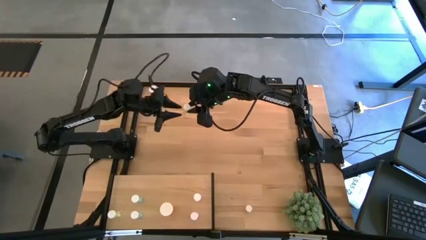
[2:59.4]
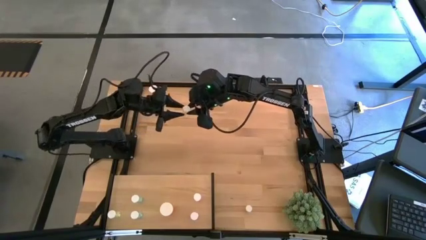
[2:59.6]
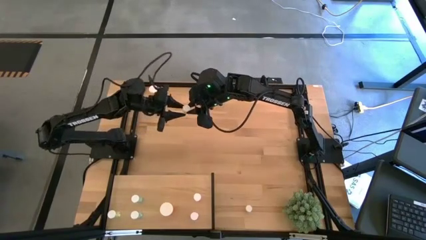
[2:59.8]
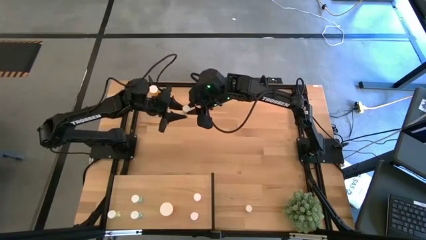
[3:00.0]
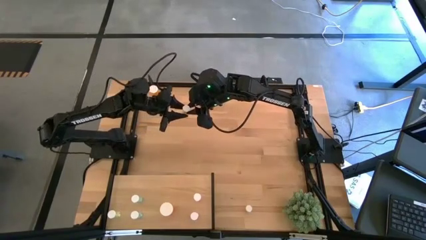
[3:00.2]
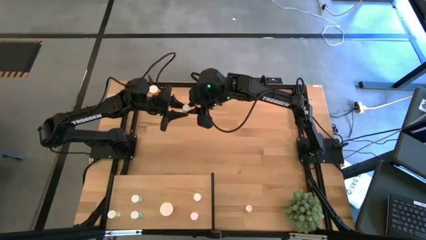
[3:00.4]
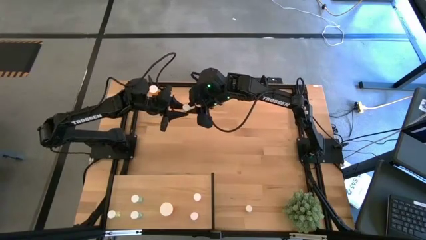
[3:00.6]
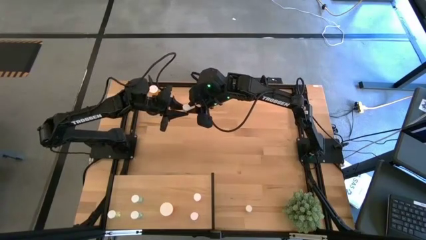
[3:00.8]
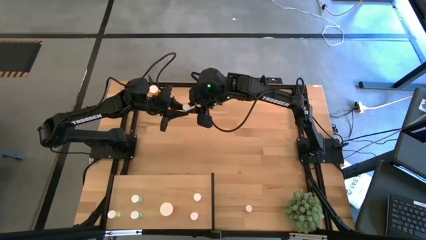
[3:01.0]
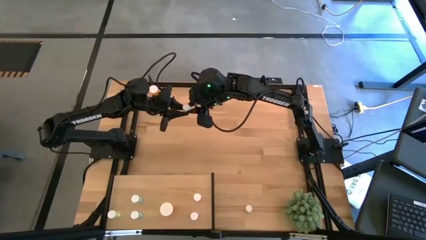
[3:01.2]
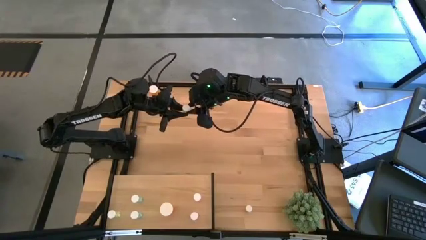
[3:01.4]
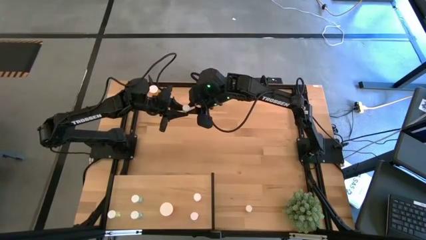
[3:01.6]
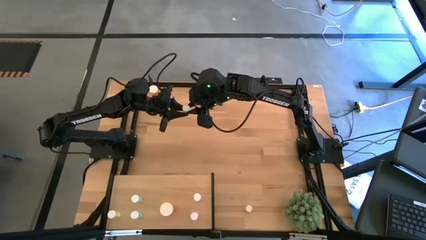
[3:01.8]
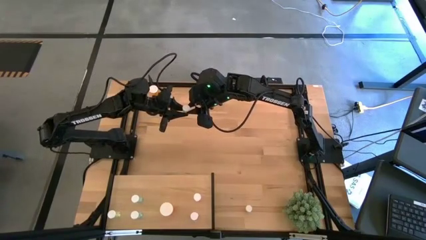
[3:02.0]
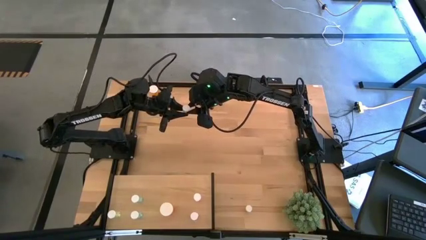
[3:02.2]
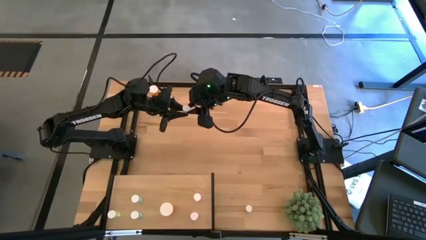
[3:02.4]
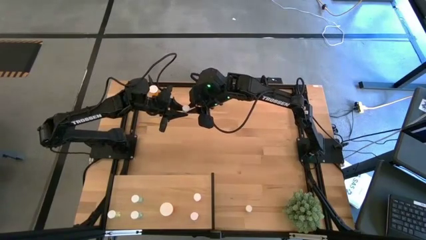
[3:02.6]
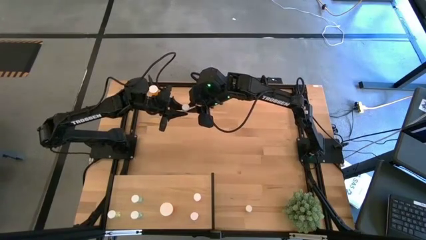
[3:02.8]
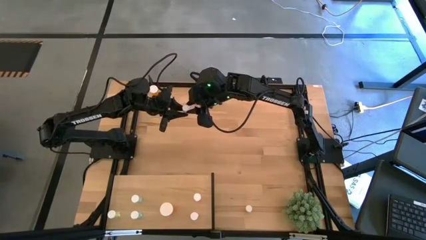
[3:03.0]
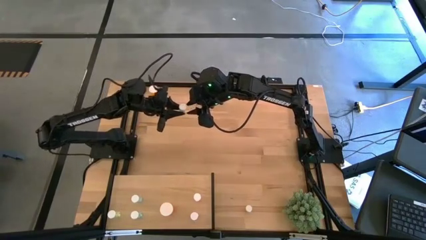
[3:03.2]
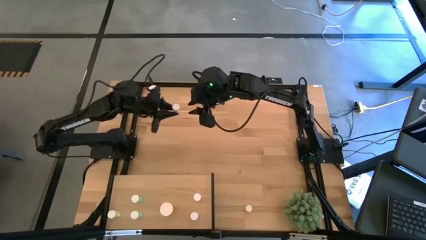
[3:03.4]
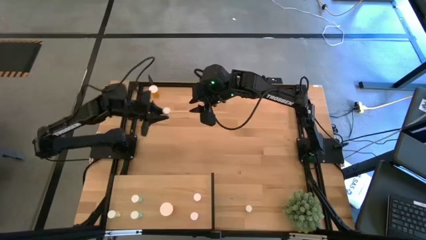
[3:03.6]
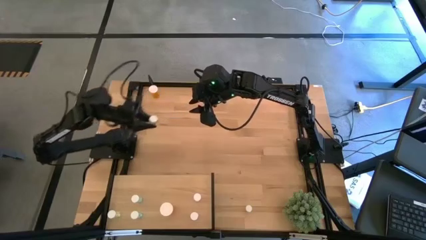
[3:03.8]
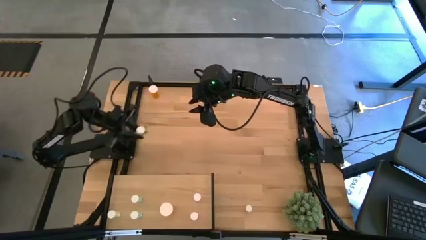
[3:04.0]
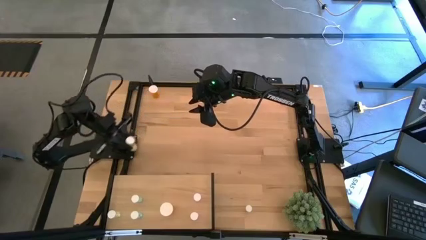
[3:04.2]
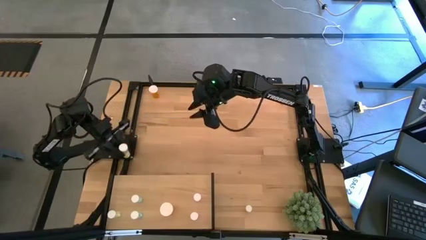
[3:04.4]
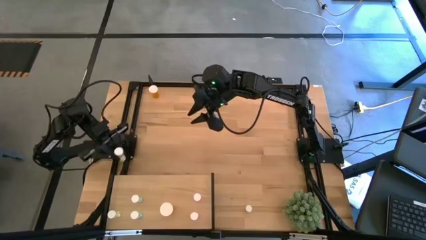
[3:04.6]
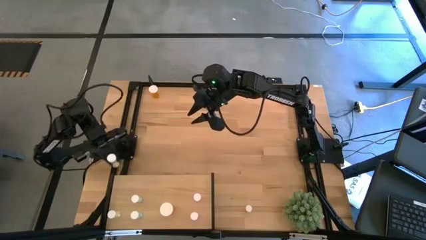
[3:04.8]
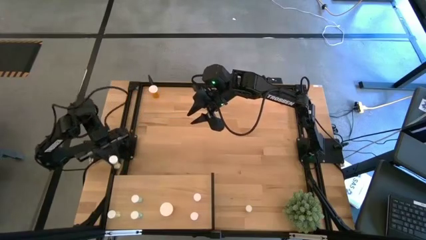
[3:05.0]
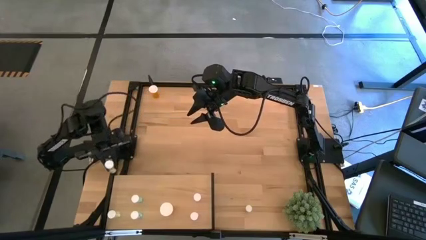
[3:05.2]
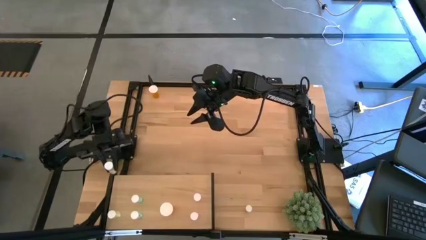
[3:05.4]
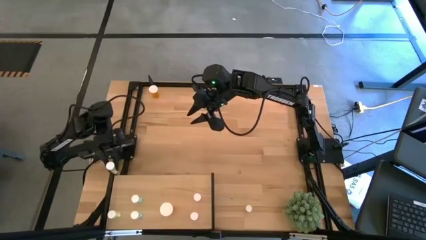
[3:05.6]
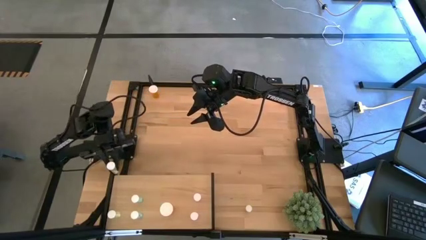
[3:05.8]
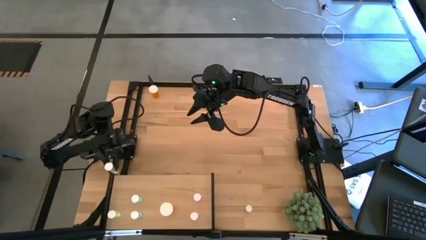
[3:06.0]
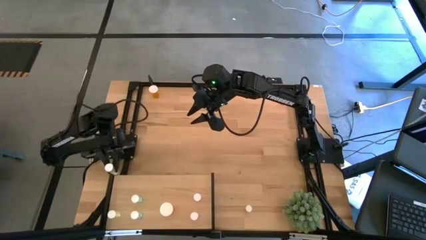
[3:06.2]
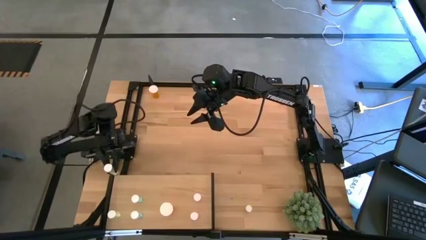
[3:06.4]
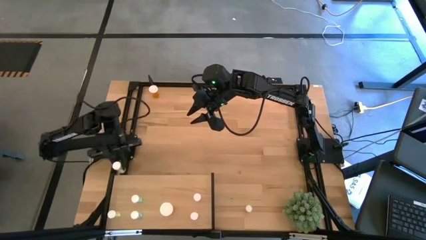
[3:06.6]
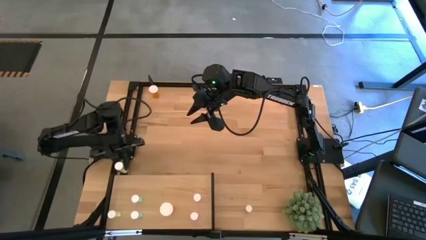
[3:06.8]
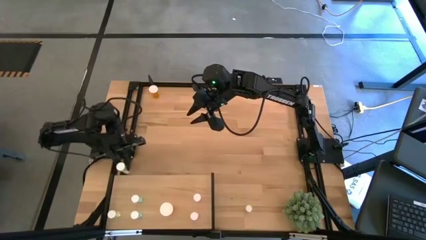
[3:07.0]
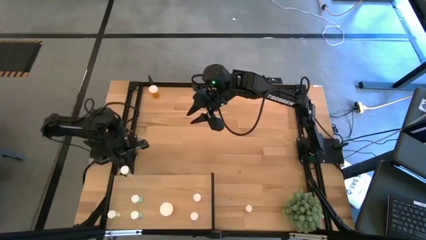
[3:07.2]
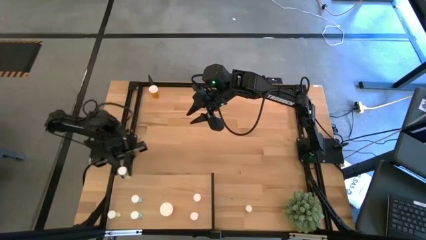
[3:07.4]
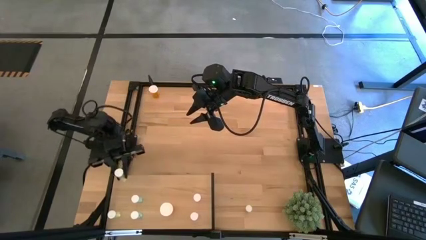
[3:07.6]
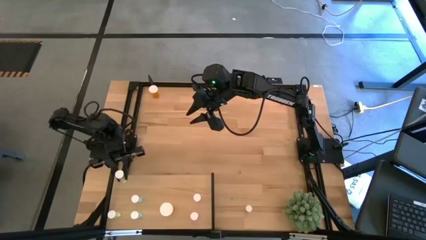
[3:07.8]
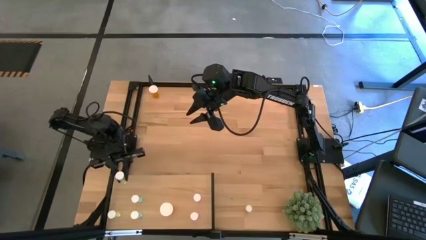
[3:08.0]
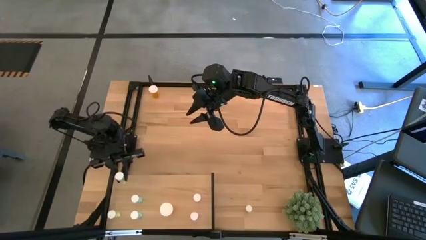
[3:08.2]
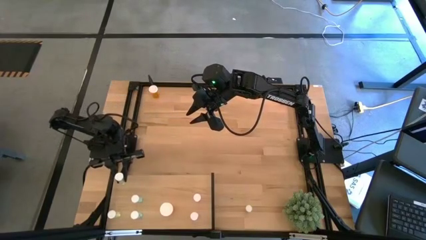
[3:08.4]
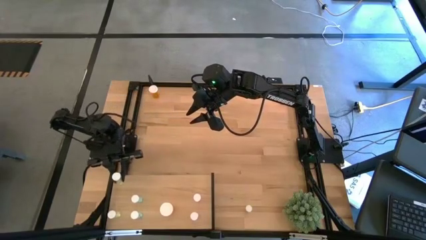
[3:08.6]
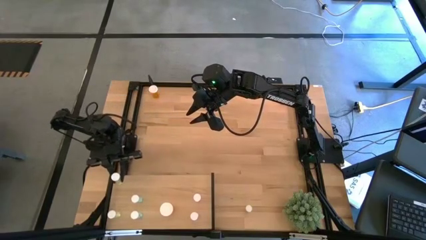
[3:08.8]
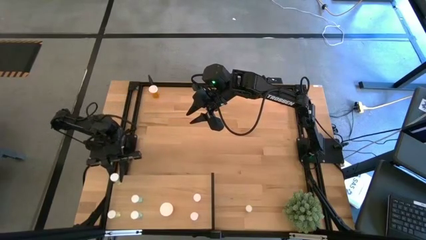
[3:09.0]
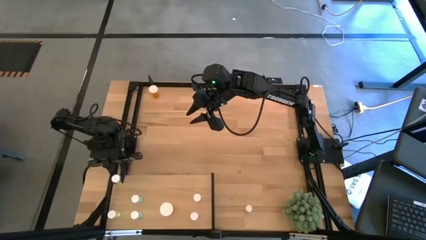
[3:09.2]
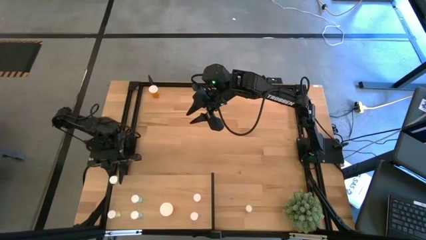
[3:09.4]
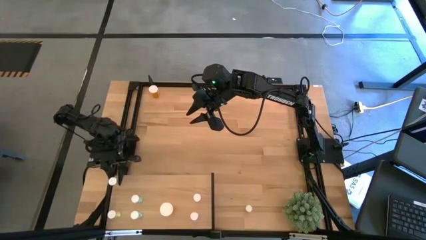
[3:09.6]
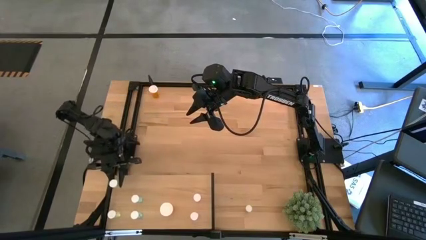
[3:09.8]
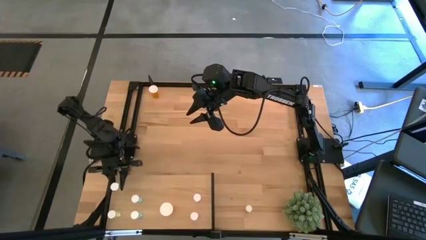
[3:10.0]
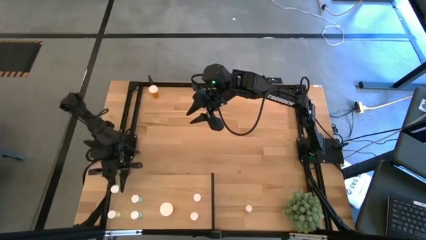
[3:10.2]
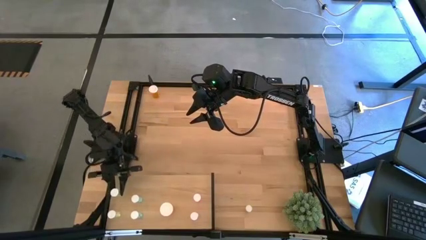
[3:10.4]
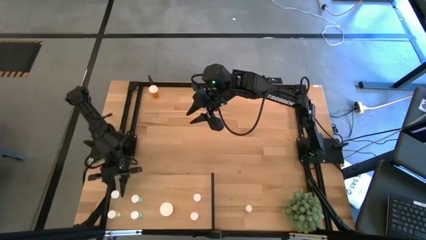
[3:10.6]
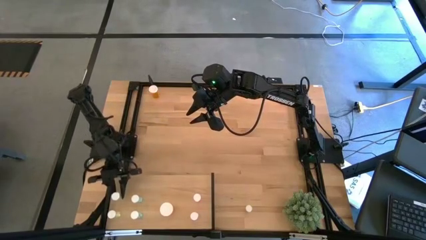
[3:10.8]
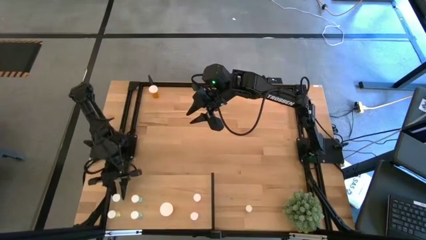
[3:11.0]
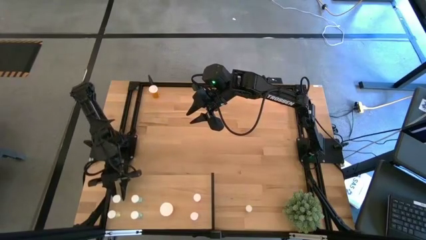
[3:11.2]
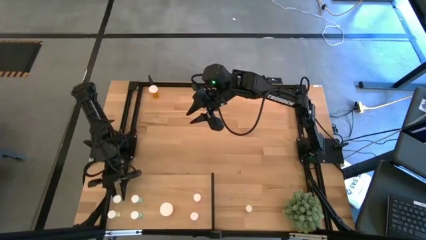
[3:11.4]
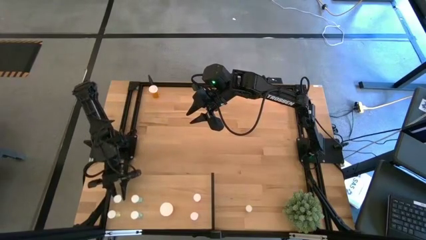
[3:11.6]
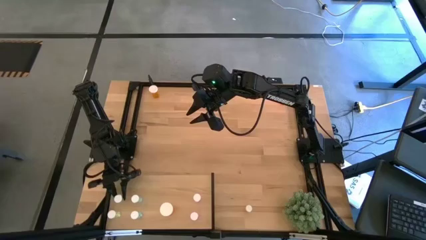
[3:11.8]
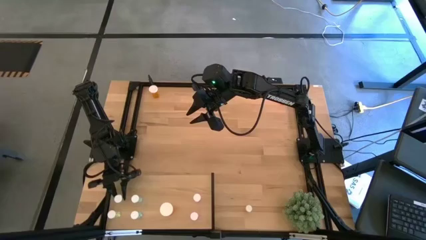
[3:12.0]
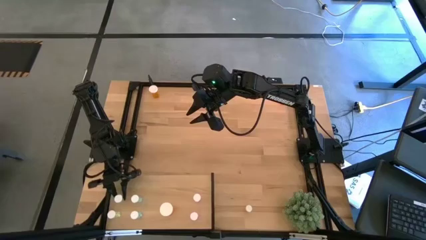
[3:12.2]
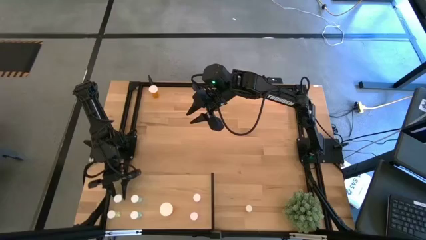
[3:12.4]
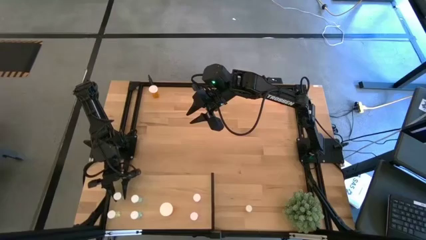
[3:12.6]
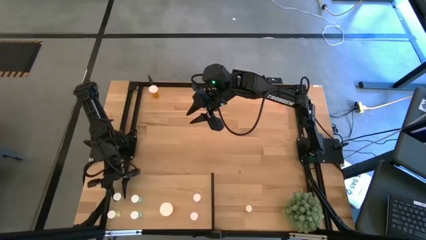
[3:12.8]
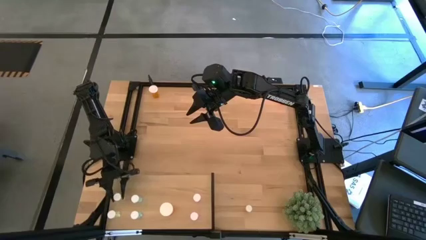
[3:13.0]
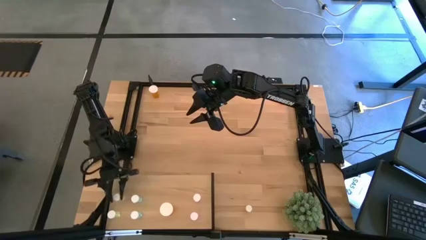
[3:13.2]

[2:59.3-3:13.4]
Task: Pick and place medicine bottles onto shelf by color
Put the top right yellow pill bottle on the shelf aligned with the other yellow pill bottle

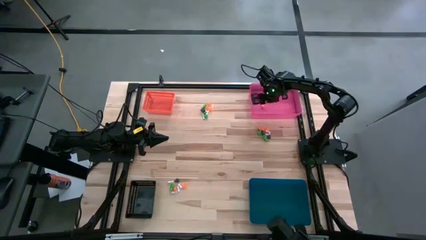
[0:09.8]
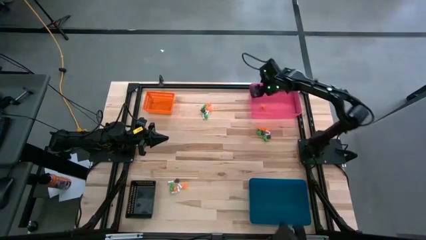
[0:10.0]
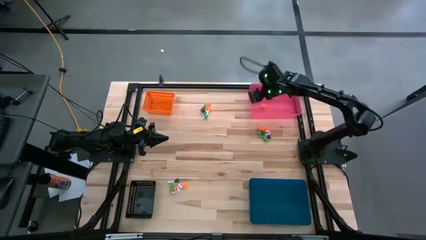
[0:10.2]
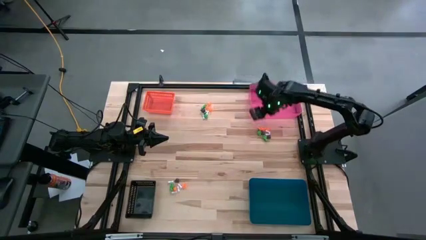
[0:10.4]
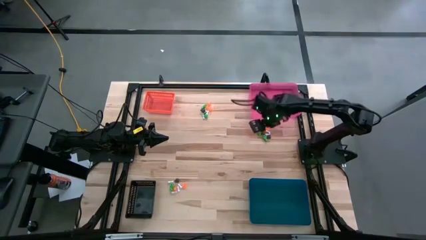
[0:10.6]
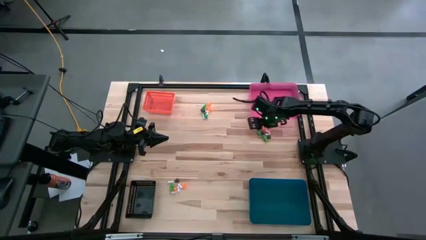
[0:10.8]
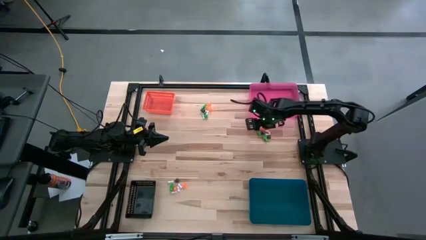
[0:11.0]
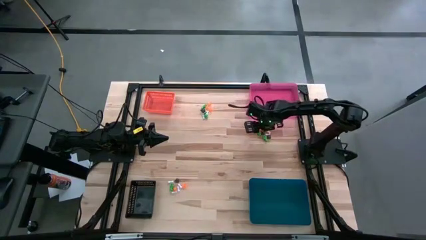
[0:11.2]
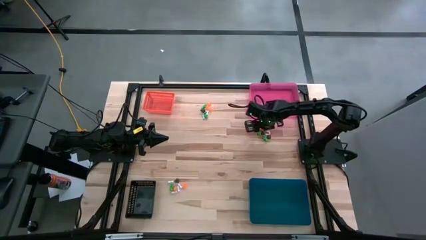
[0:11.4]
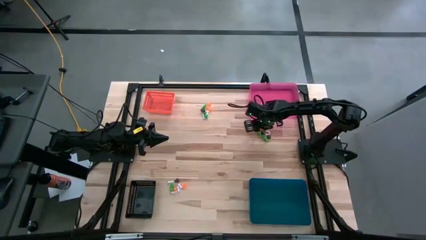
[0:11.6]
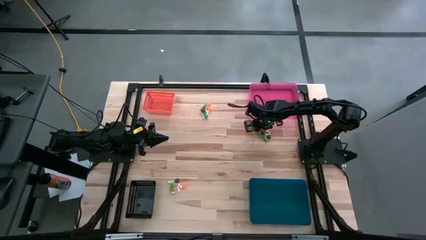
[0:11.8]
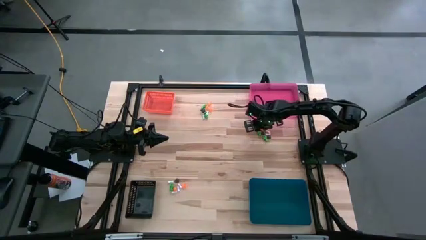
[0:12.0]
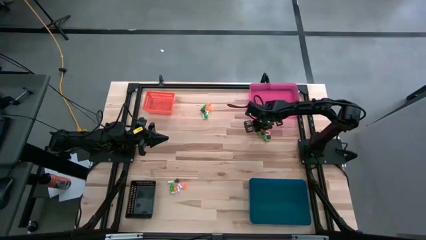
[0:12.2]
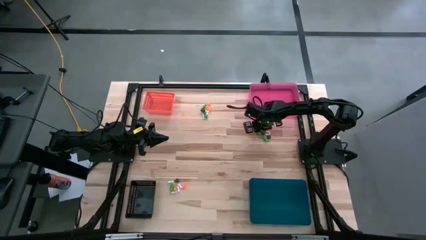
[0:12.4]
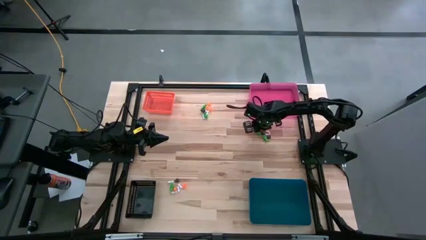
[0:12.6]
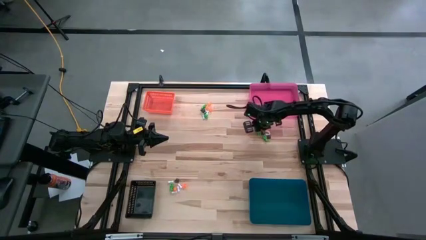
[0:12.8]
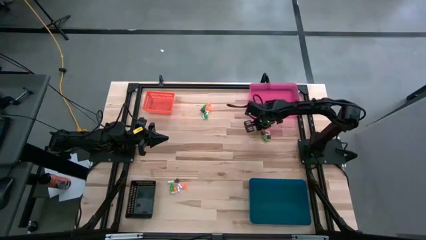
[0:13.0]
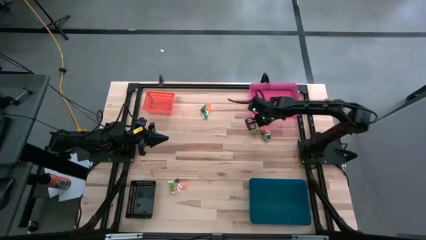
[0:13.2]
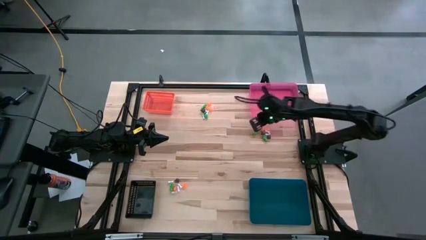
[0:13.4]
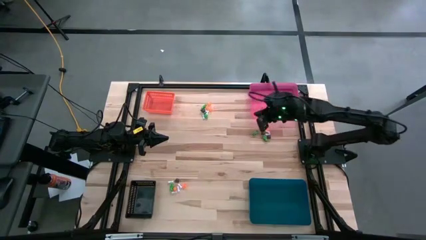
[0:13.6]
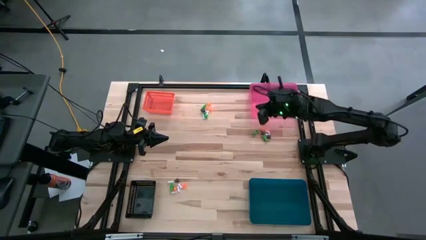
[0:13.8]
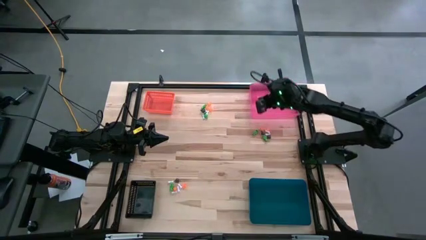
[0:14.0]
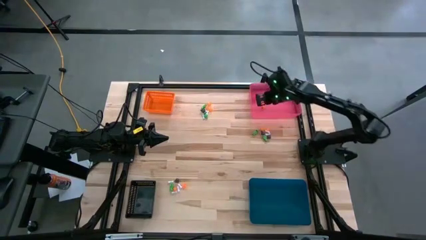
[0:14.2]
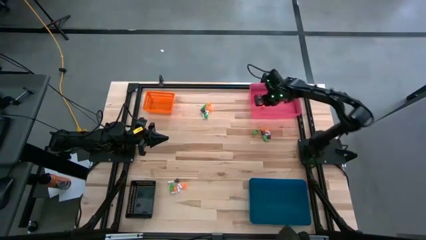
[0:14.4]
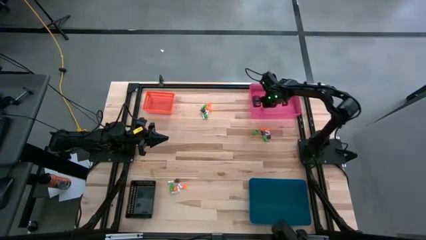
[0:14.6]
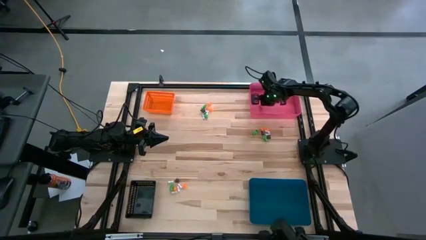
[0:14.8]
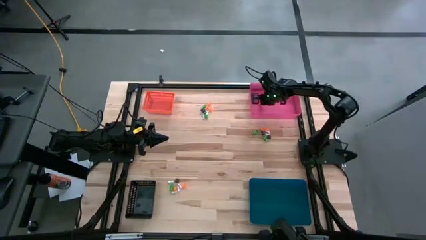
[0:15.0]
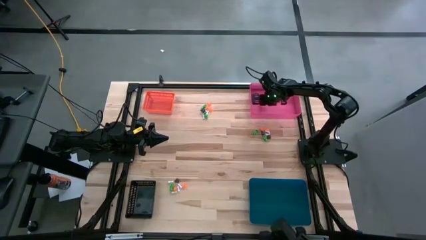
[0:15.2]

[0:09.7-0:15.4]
Task: Sort Halloween decoration
Put the orange spider toy into the pink bin
